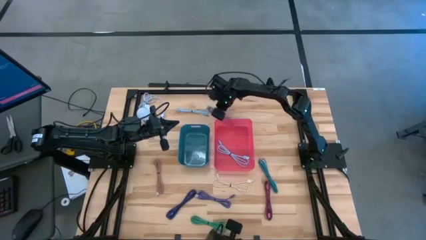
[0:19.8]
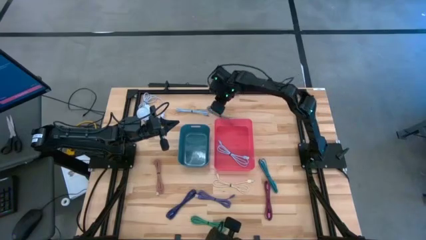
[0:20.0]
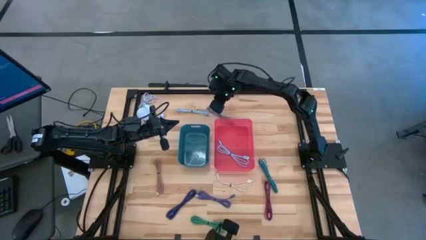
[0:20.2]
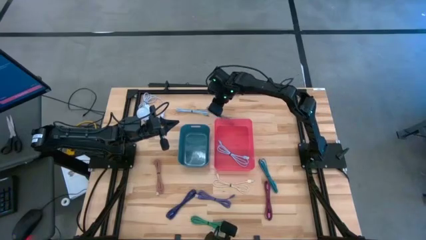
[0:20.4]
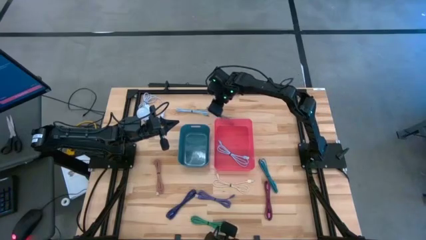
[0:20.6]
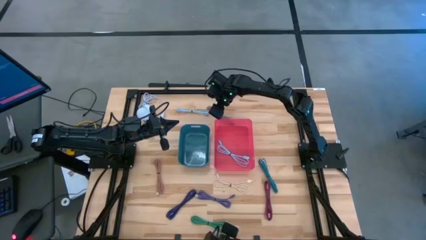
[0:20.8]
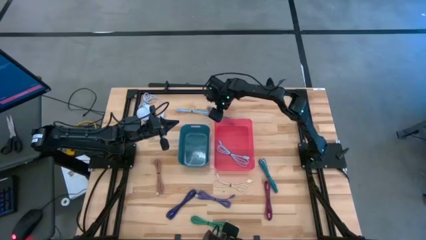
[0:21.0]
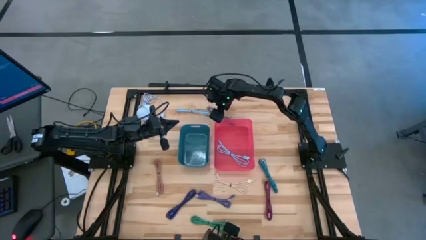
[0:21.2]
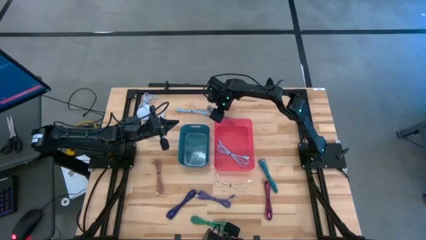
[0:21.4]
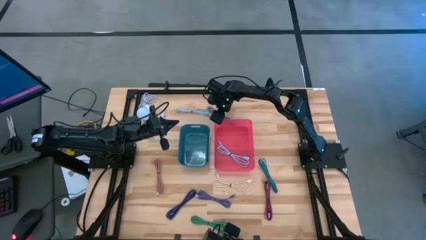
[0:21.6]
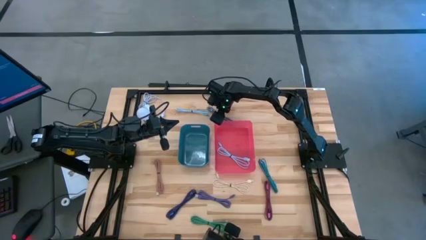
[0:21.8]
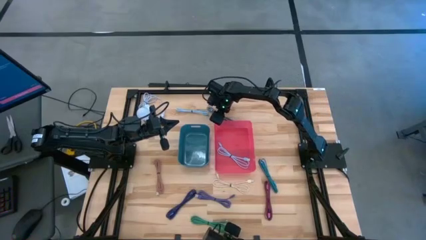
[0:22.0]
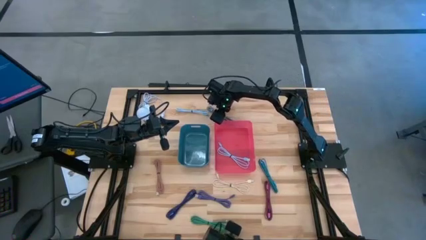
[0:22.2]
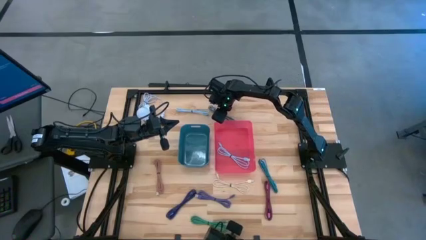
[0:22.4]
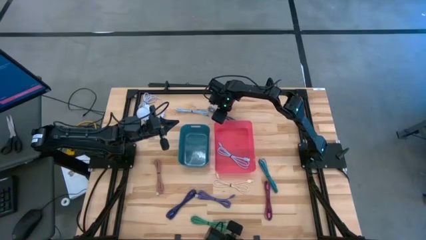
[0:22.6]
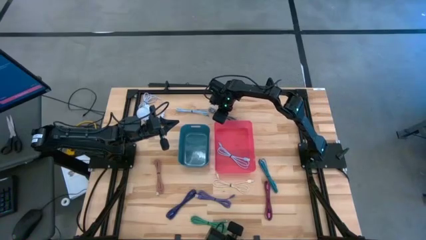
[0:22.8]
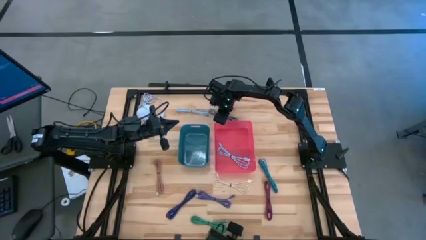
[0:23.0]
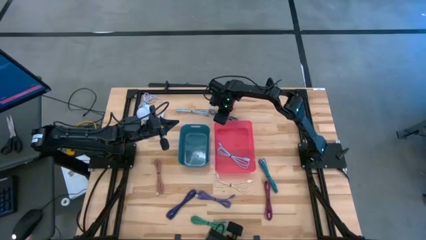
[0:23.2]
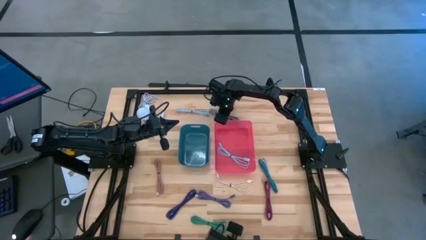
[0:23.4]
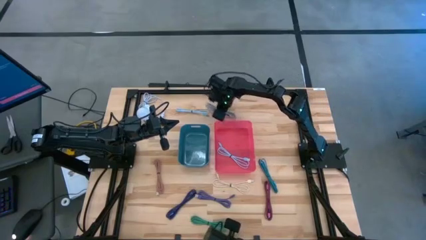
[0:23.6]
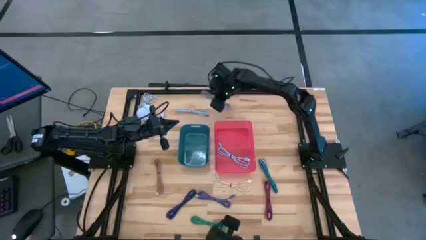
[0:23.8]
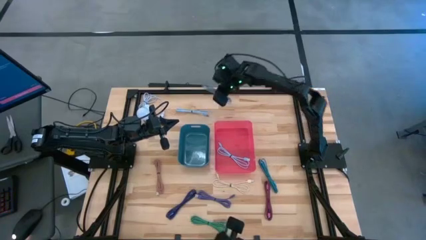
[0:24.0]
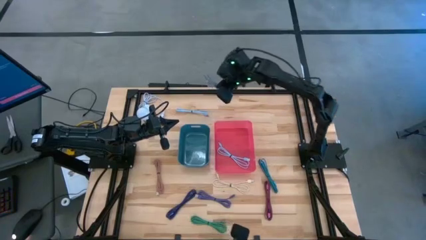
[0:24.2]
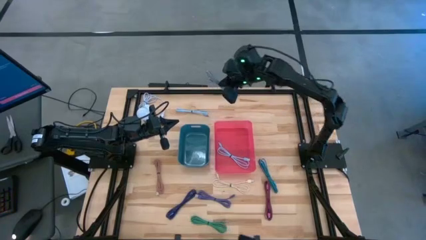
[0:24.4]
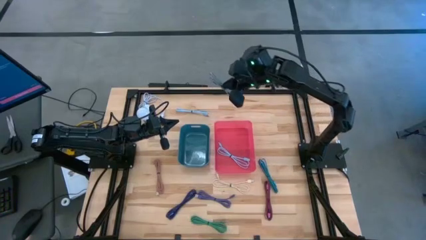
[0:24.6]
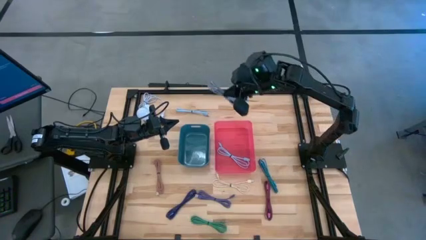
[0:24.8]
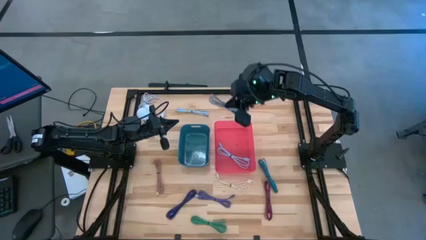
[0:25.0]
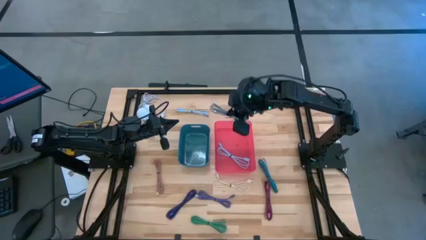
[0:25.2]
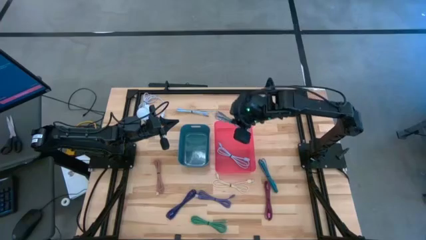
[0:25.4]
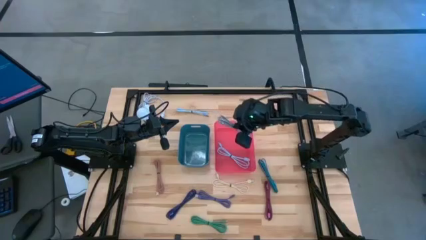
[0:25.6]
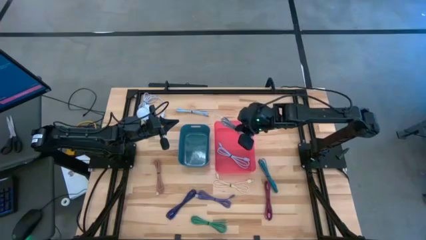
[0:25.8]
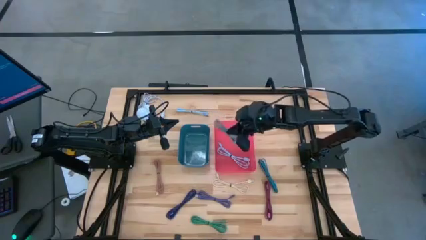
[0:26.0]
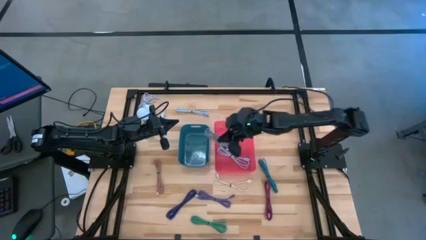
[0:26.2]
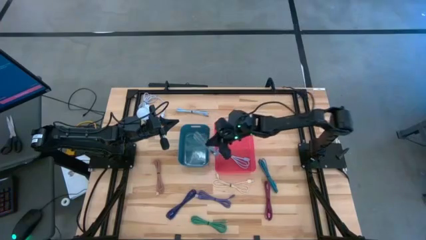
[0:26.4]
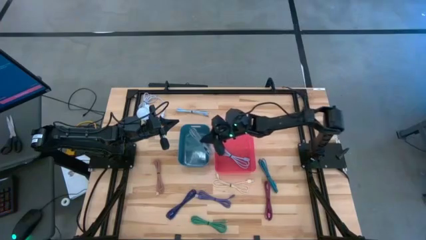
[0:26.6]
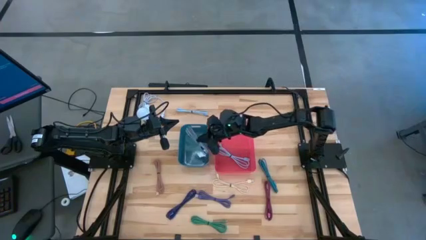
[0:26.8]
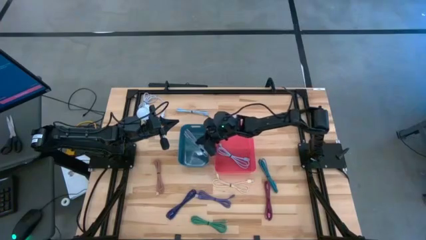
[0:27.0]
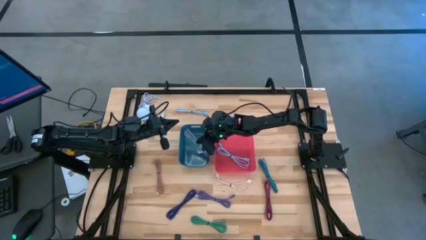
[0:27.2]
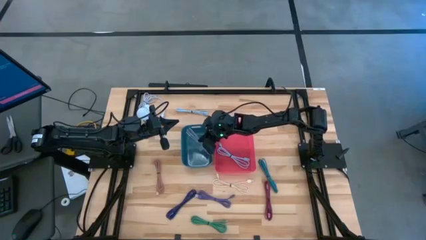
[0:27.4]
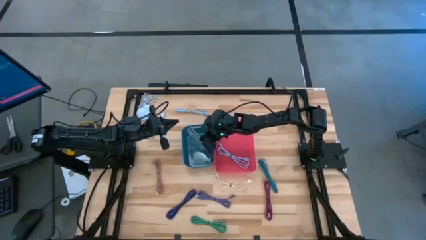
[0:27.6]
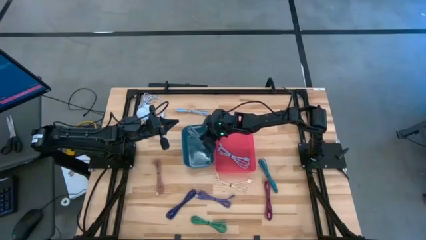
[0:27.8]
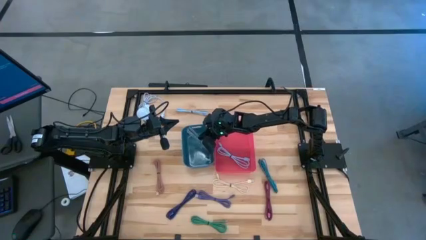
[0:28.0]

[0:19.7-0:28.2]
Task: Pick & Place USB Port
Put the patterned white charger cable into the blue bin

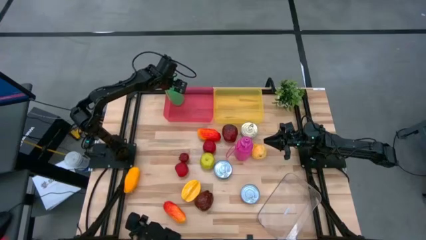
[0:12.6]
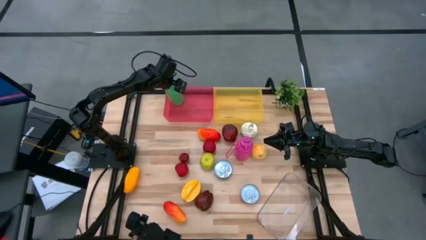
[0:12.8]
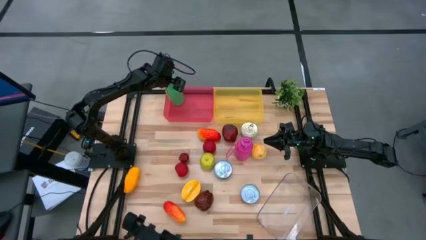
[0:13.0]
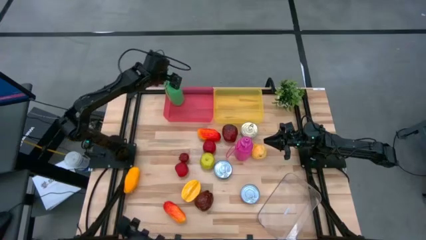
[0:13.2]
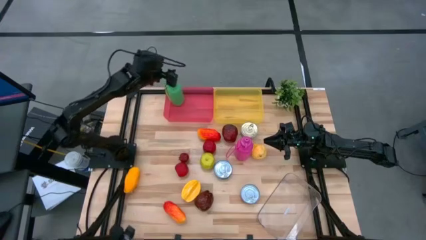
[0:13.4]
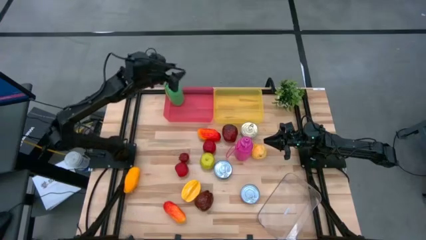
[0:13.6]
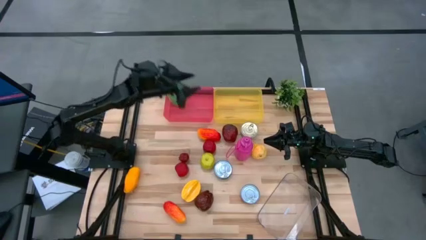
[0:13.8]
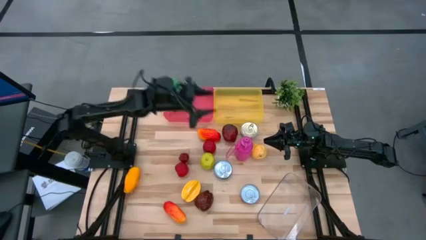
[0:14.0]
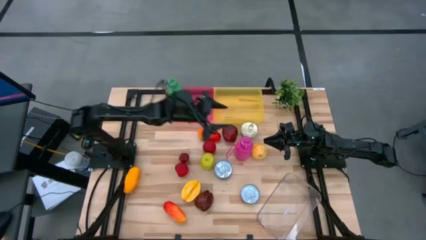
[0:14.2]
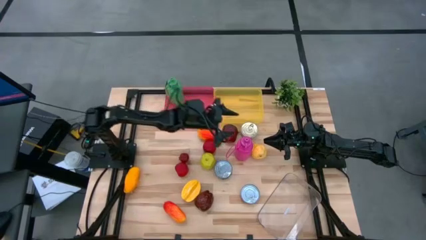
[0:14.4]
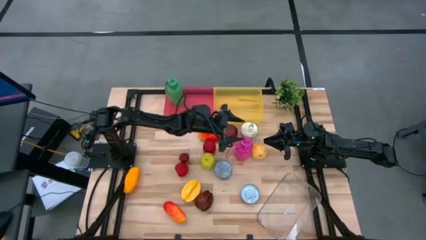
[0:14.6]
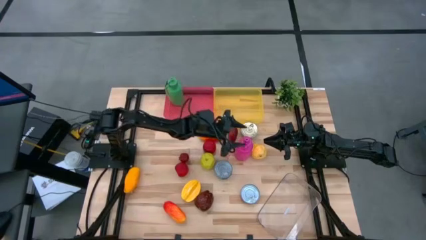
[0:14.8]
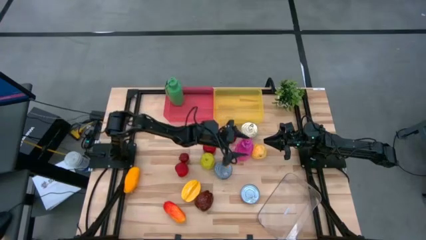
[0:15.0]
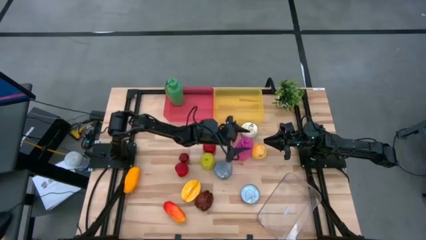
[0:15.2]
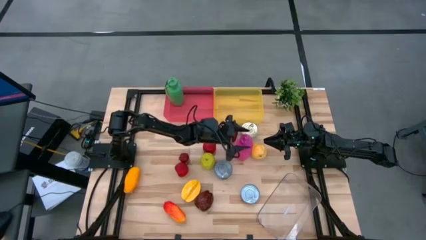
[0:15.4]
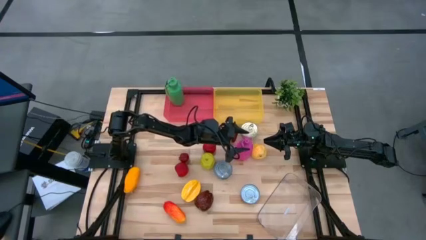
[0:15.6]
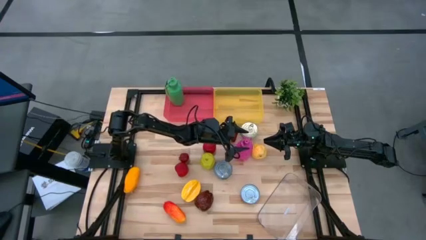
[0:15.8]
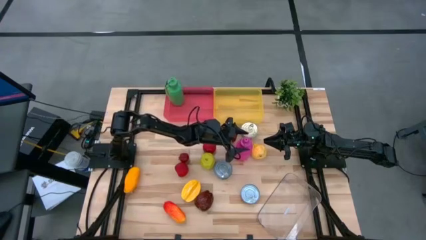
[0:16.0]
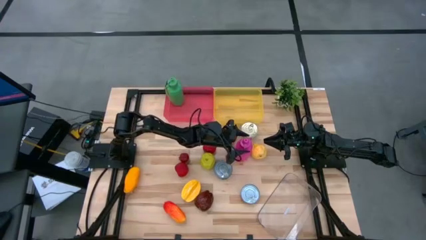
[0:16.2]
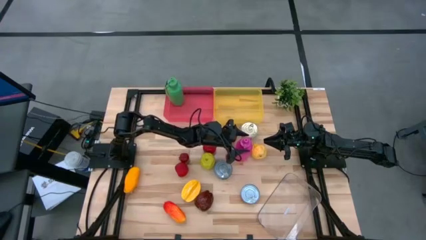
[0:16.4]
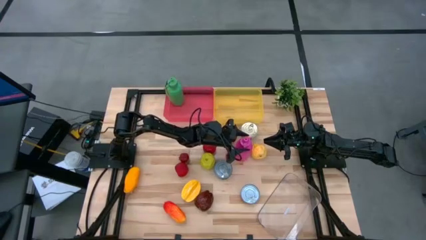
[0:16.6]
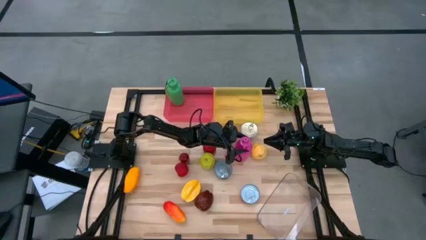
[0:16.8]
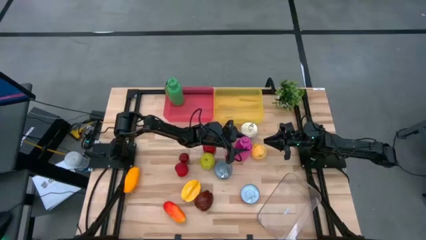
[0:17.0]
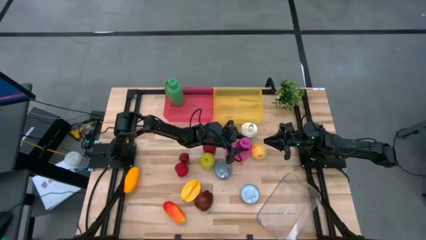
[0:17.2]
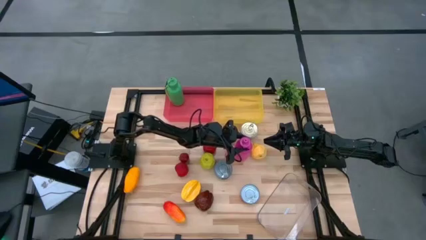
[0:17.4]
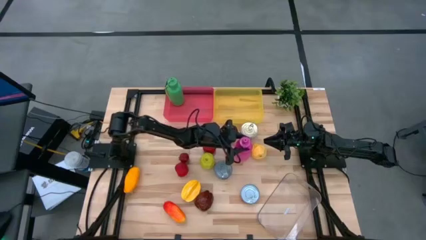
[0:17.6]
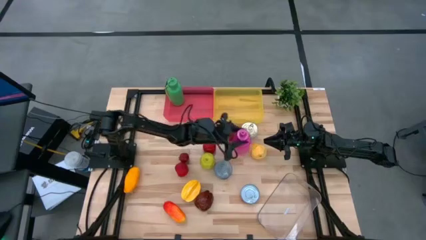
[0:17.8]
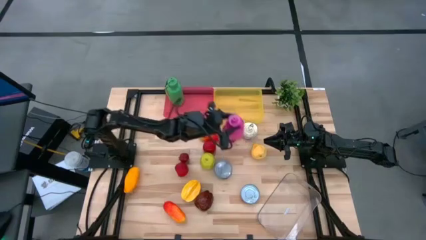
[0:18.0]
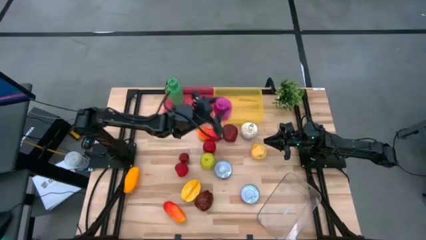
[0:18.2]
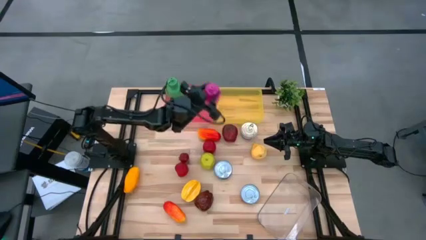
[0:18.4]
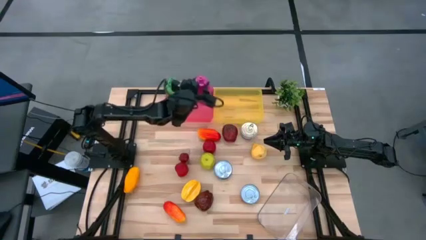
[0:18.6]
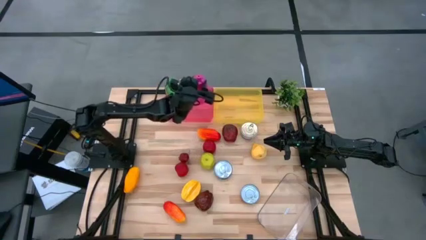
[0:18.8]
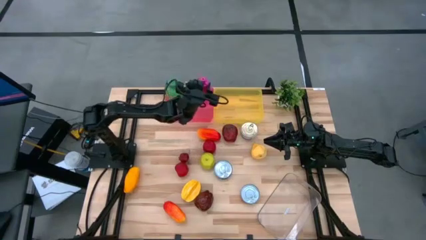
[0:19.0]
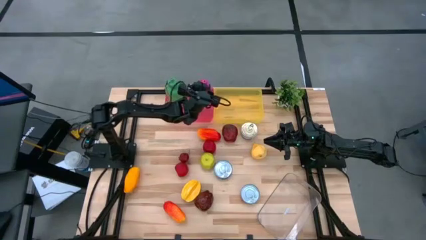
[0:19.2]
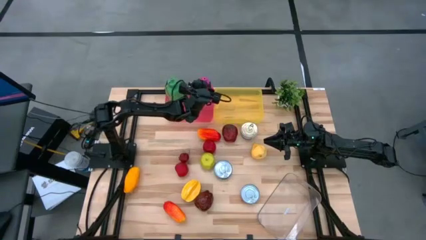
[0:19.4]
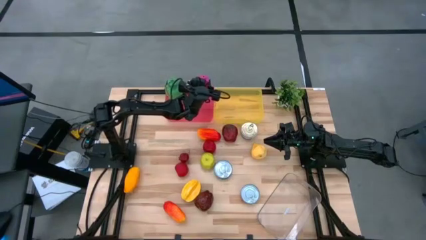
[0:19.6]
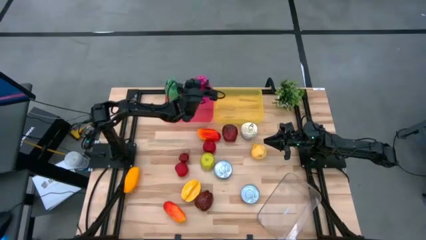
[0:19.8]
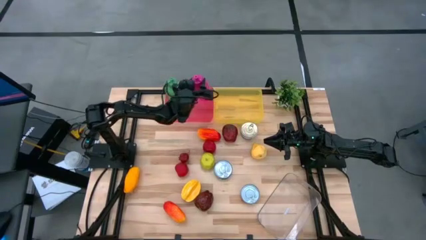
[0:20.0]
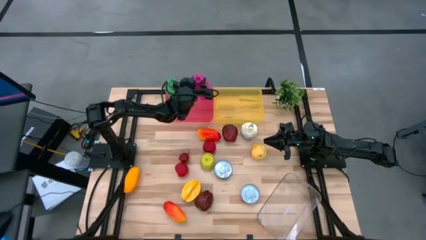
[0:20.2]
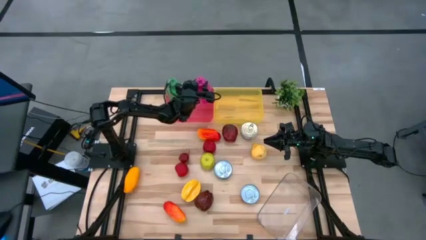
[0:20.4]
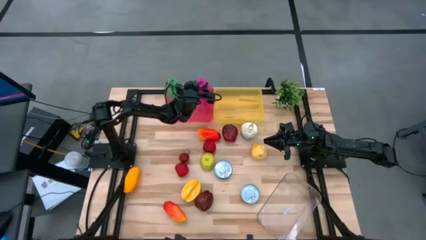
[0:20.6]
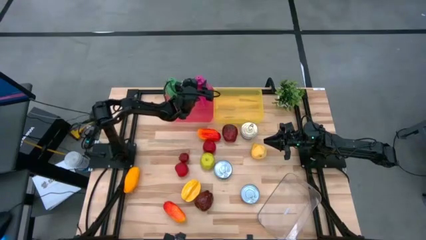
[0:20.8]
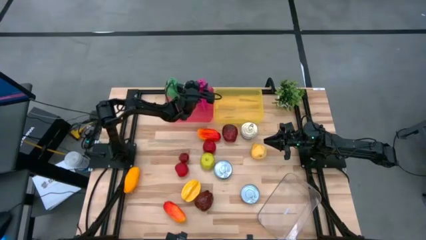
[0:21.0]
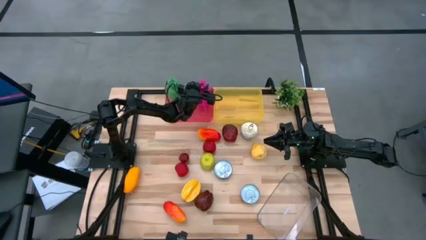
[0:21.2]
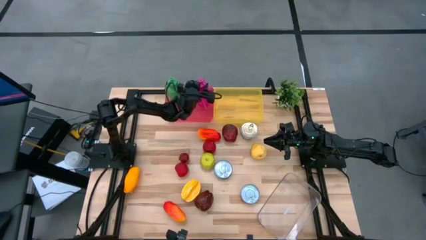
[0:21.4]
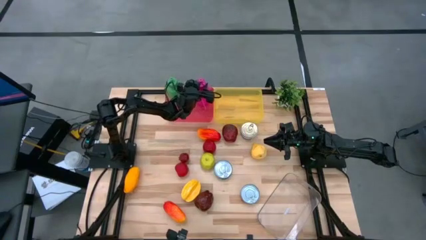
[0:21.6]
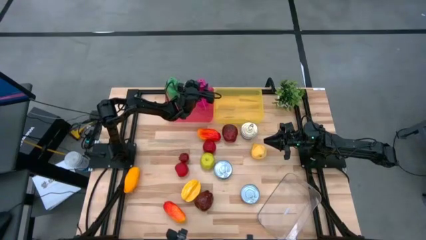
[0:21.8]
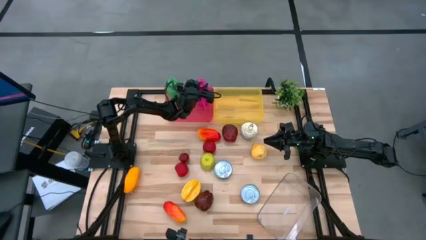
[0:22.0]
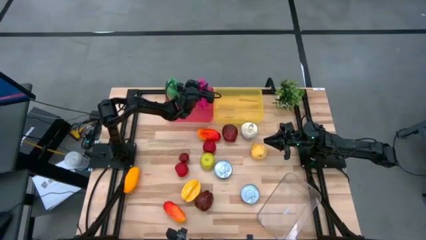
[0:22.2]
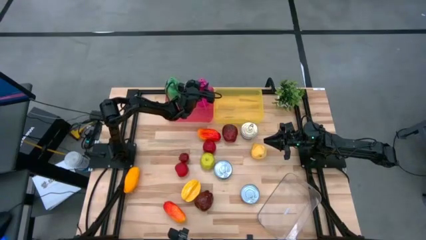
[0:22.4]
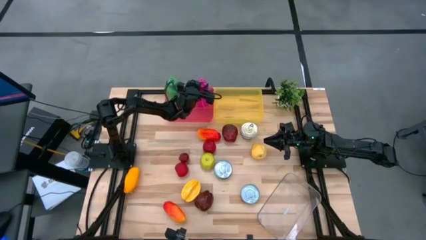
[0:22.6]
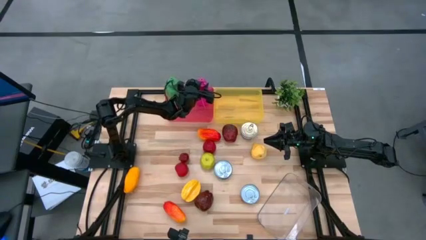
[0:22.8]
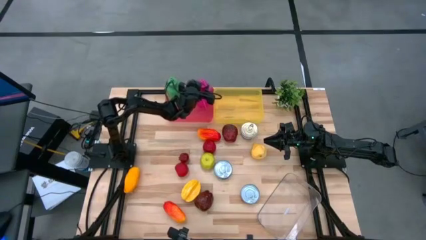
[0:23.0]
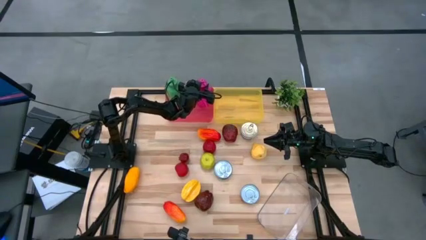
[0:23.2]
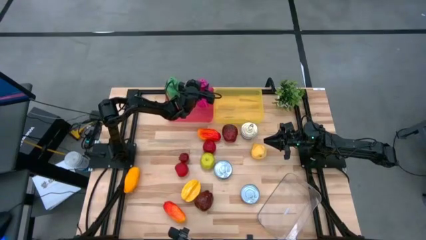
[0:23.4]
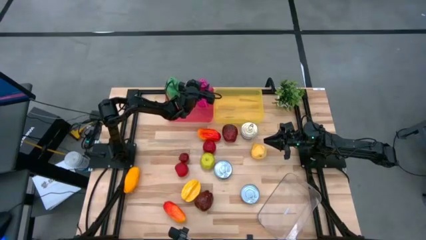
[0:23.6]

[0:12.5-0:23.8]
Task: Pick & Place Food Item
Put the pink tumbler into the pink bin
